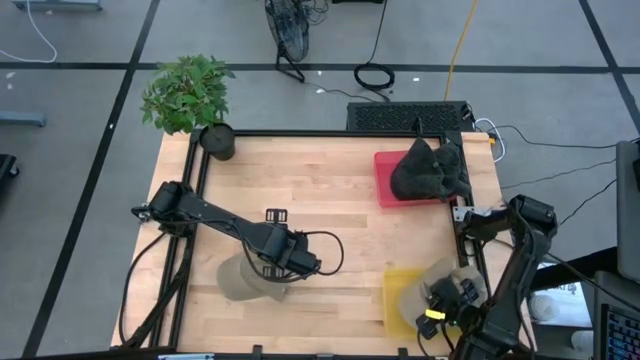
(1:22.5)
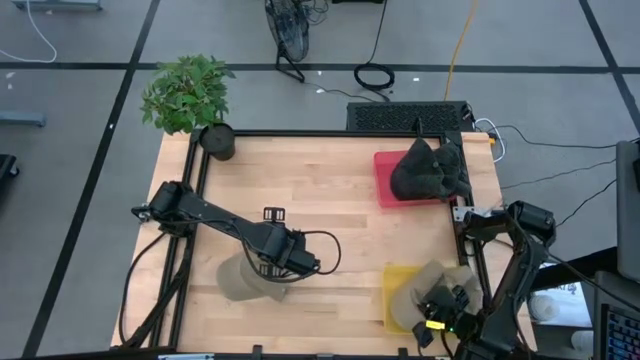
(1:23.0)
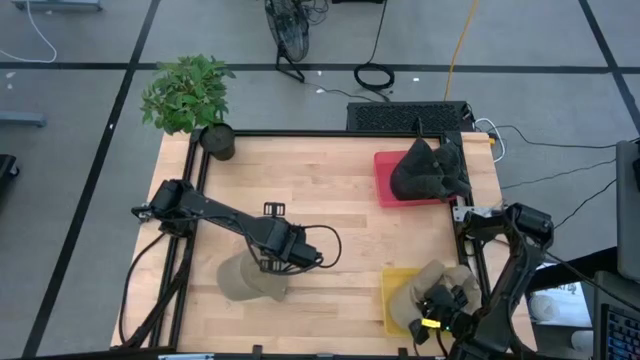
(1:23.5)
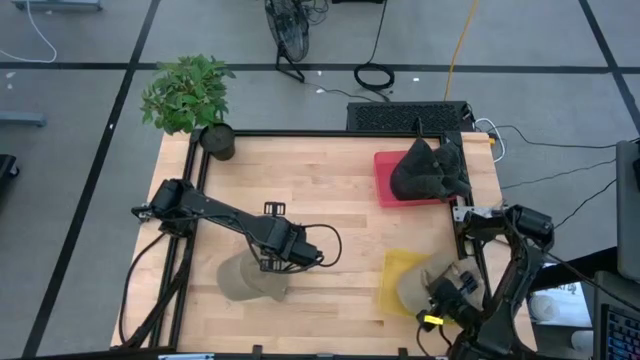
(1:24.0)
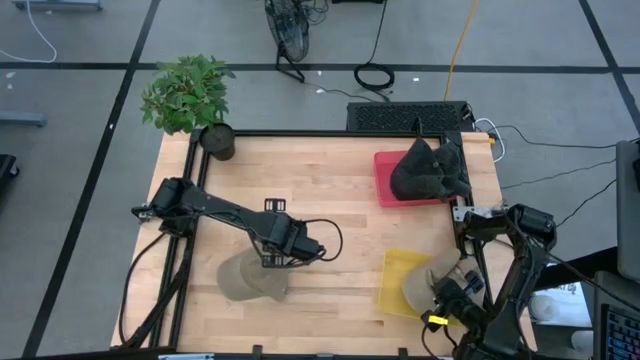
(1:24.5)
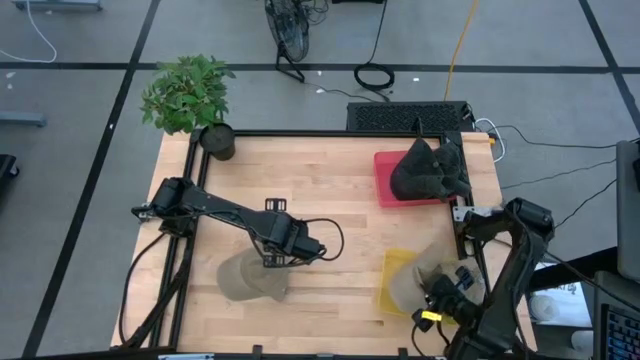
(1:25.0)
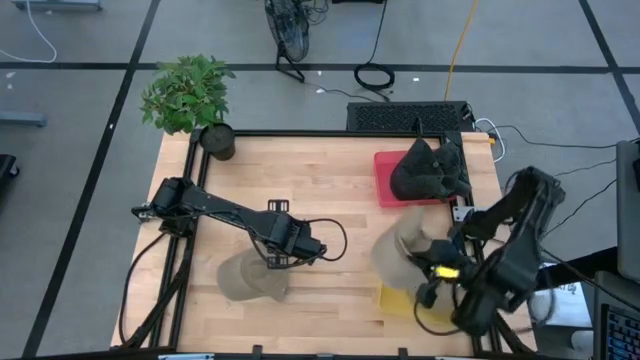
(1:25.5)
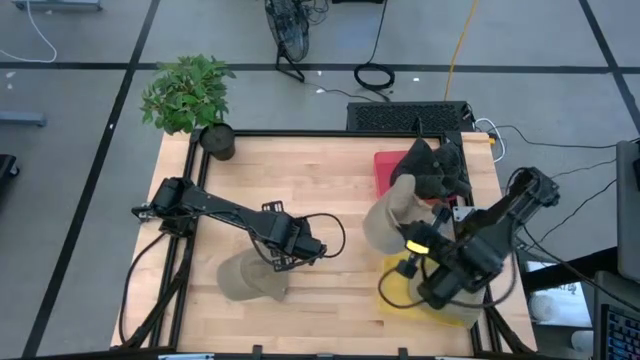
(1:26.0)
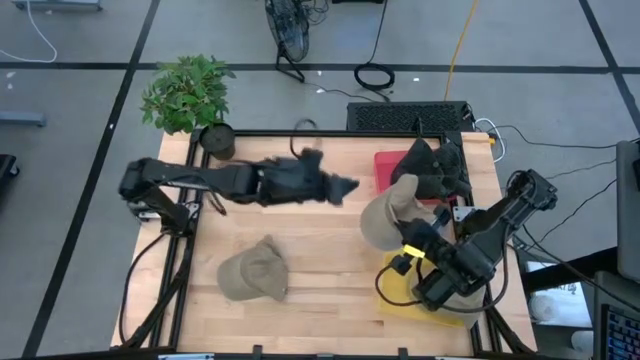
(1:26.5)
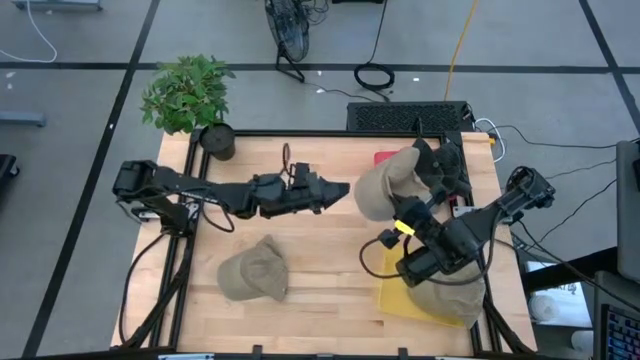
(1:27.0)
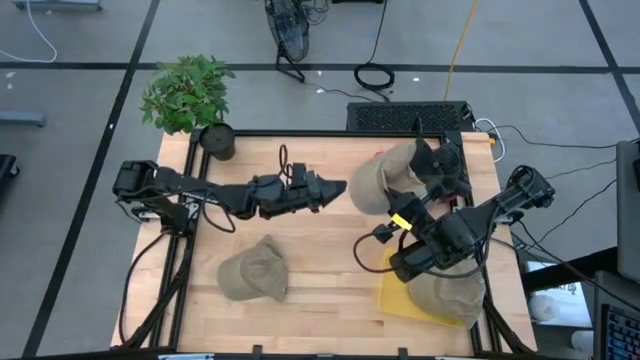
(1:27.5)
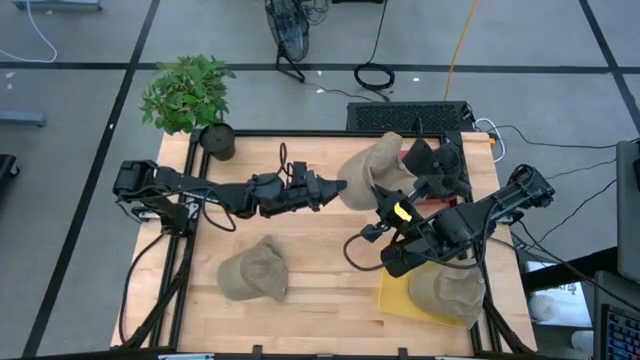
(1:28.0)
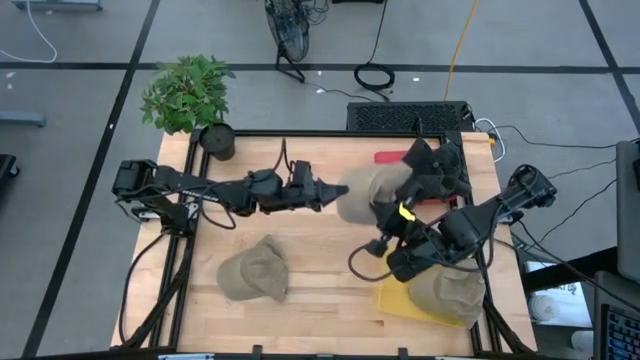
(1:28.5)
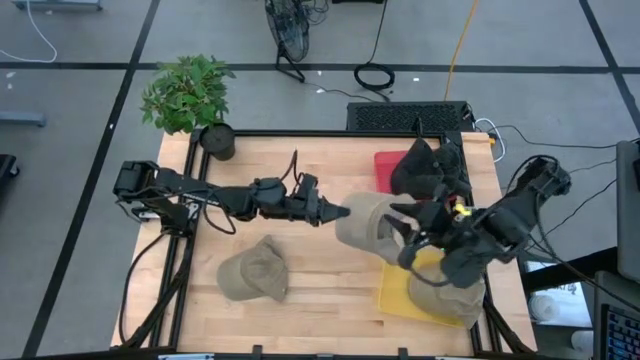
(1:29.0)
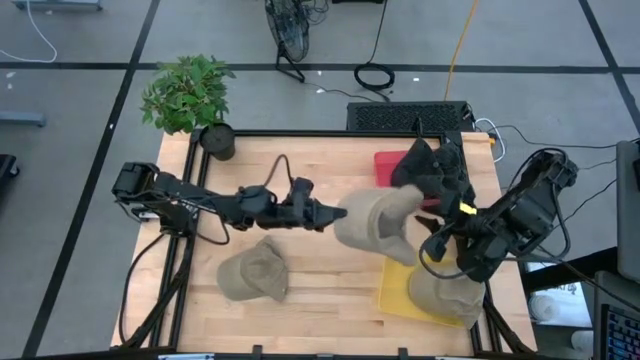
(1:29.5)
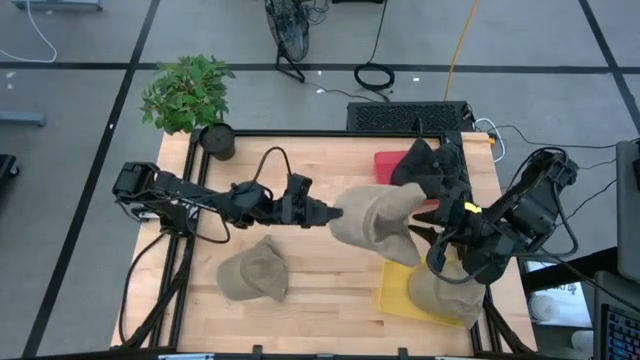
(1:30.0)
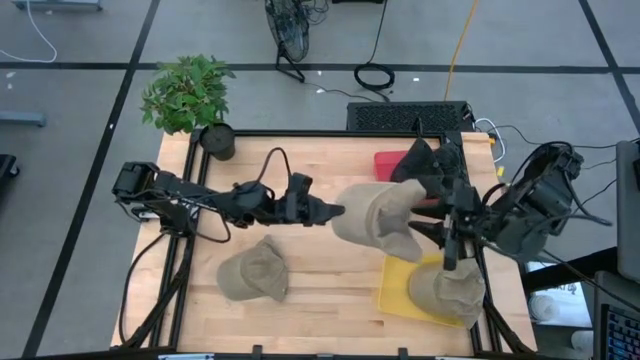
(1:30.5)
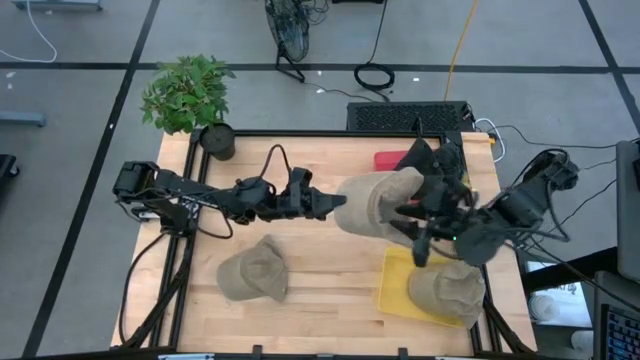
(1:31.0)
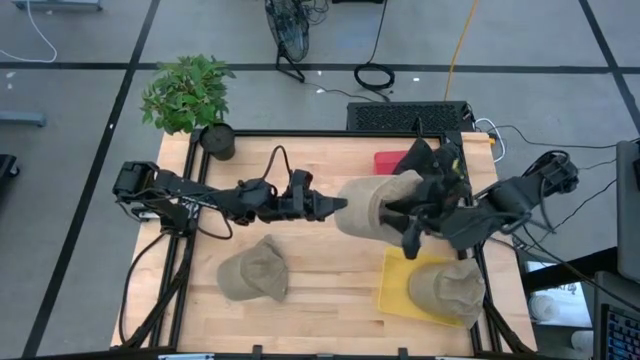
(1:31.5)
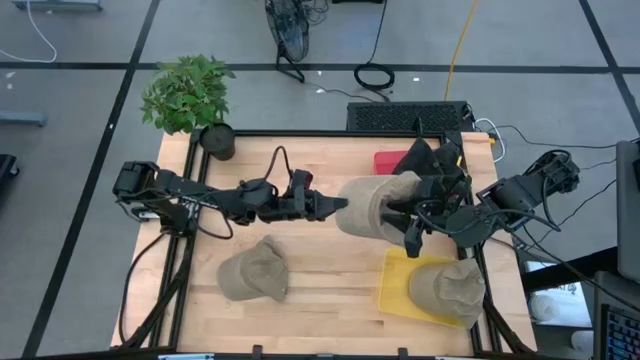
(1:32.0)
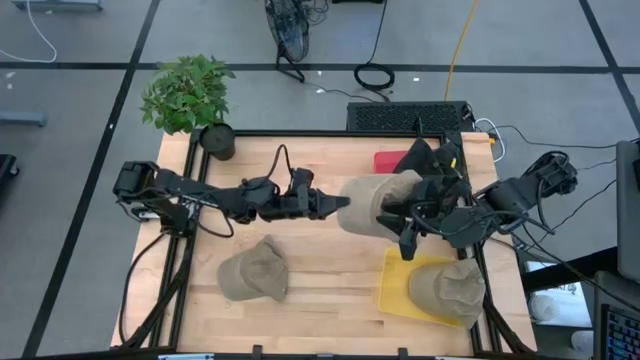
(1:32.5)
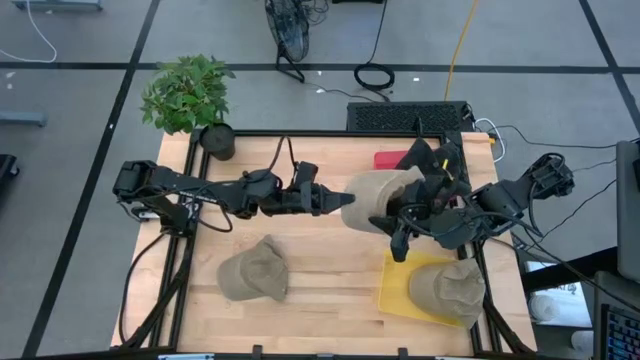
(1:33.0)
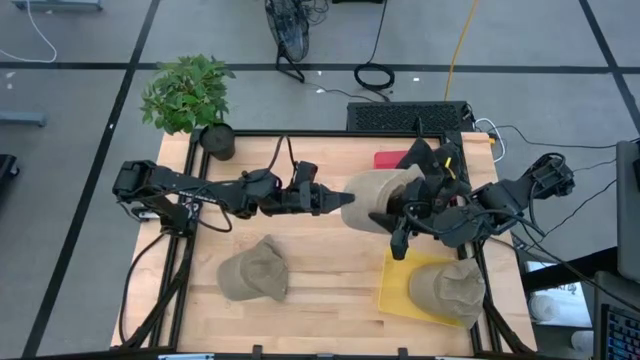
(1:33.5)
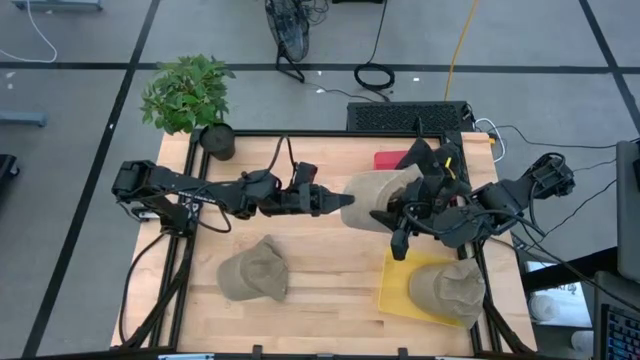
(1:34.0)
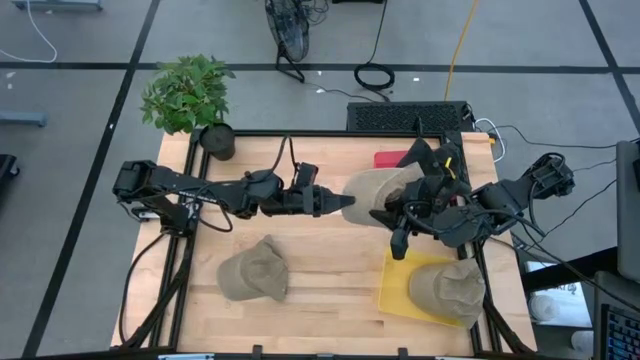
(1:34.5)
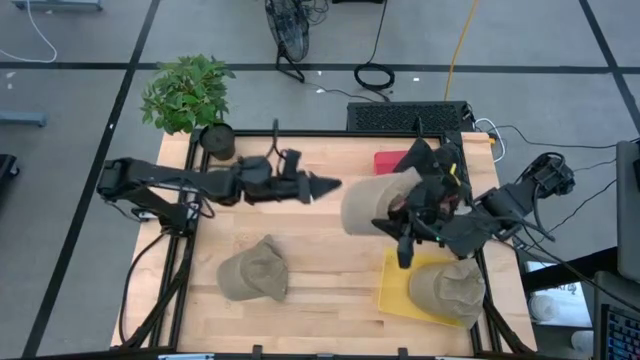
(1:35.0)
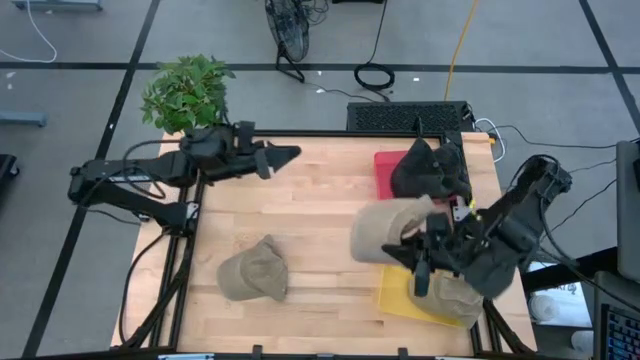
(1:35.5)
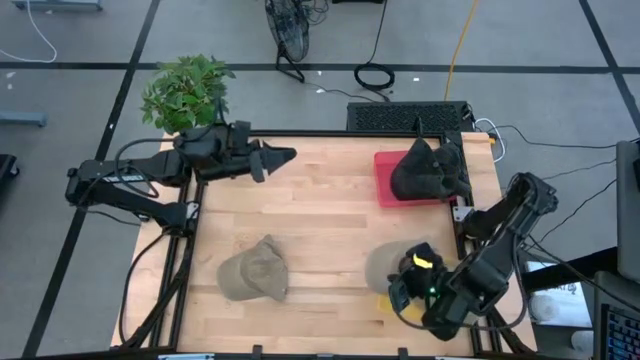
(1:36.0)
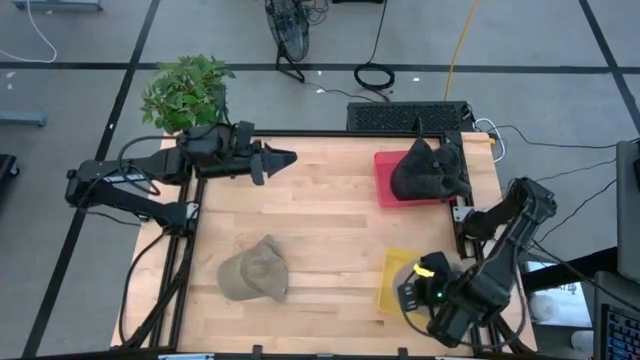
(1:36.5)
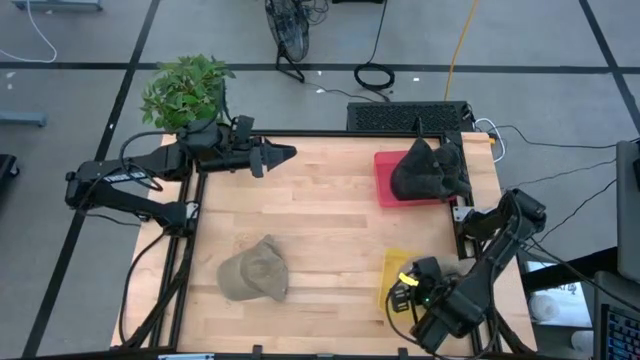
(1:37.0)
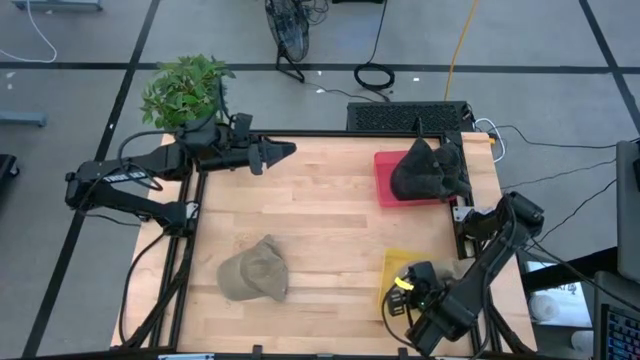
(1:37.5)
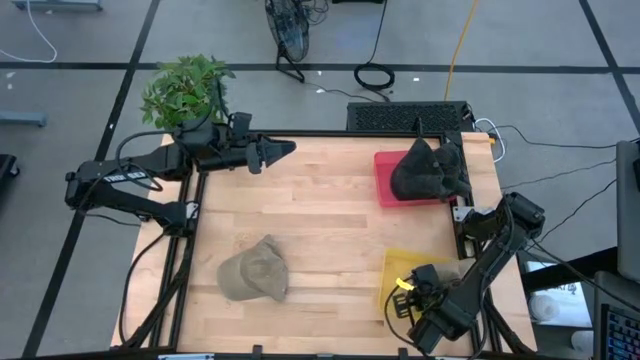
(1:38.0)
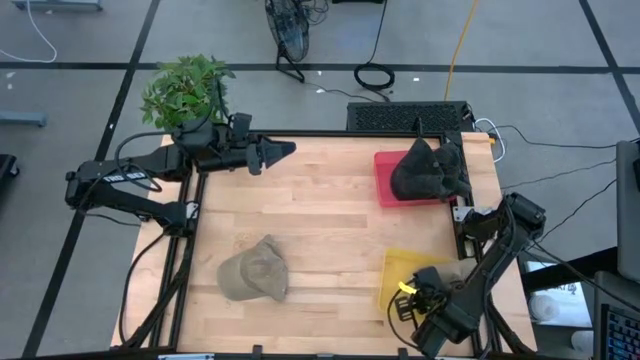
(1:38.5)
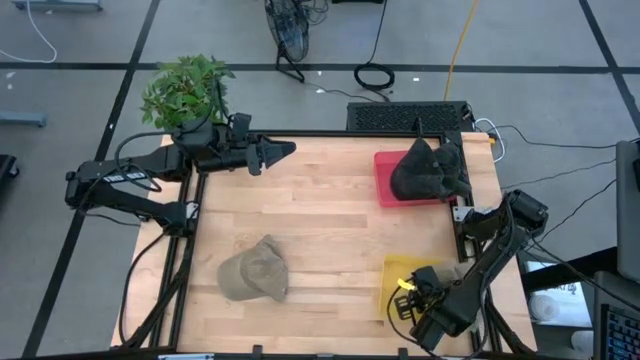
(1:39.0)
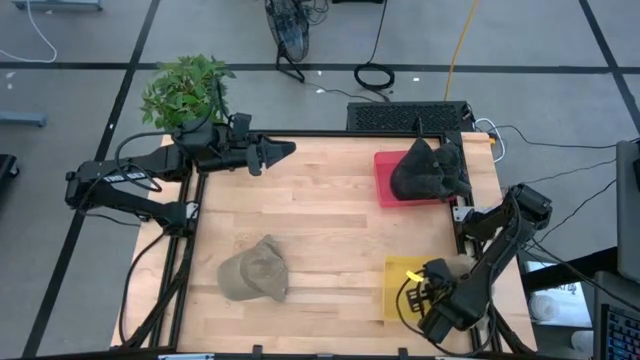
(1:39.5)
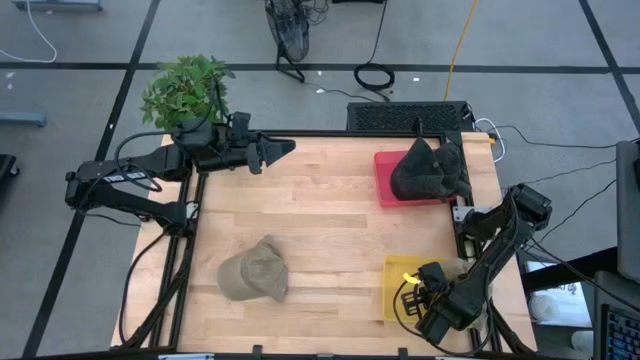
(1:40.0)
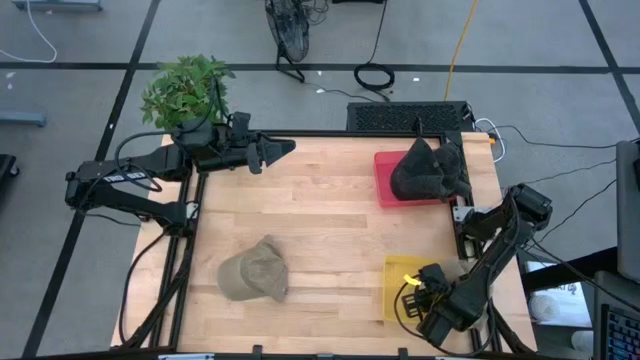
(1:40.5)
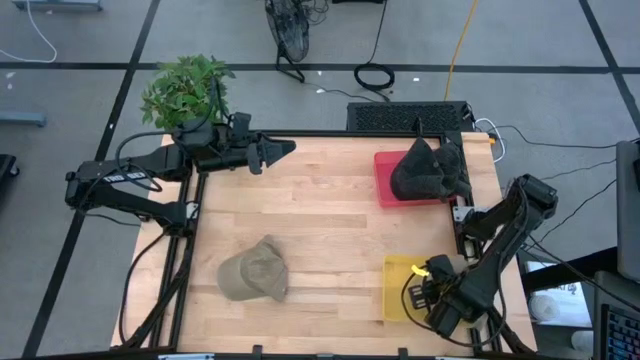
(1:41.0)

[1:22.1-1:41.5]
Task: Pick & Place hat
Put the bottom brown cap into the yellow bin

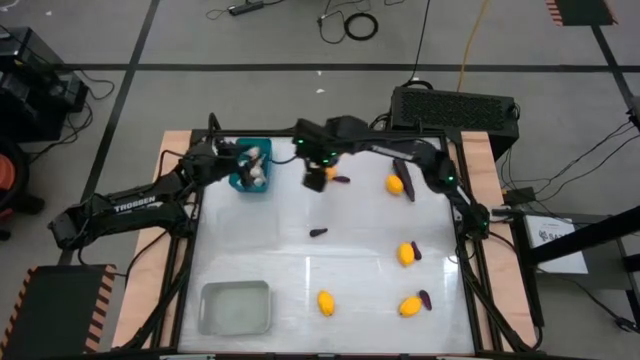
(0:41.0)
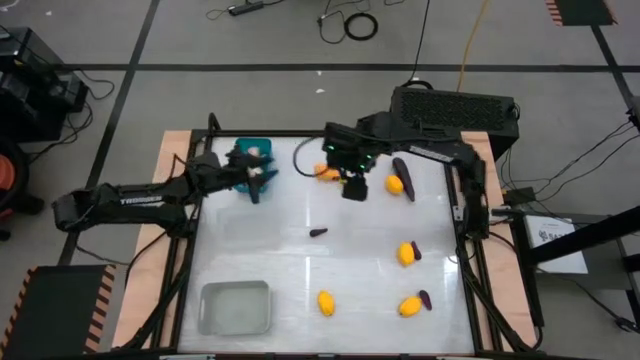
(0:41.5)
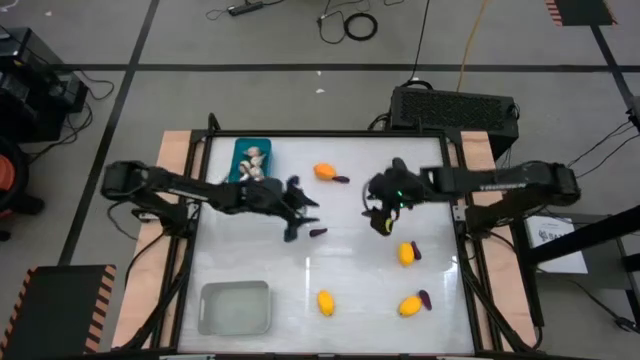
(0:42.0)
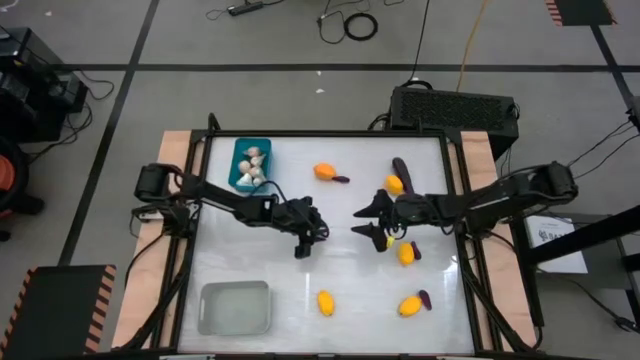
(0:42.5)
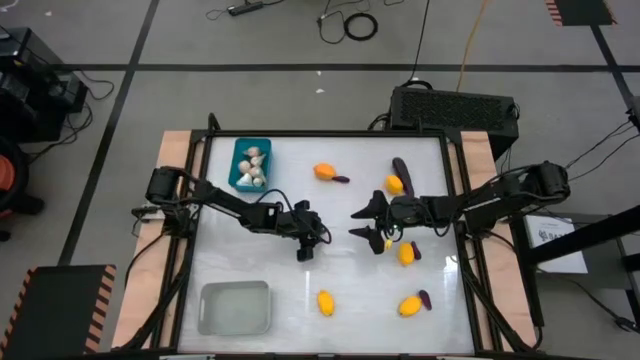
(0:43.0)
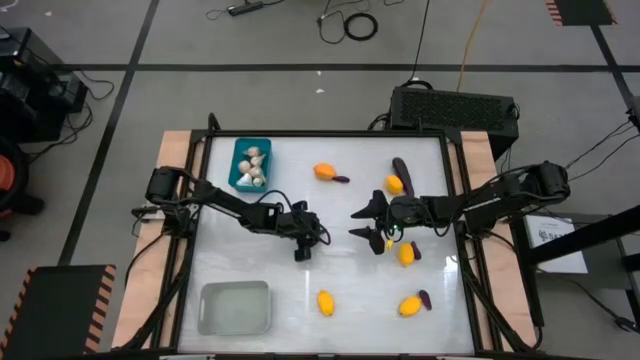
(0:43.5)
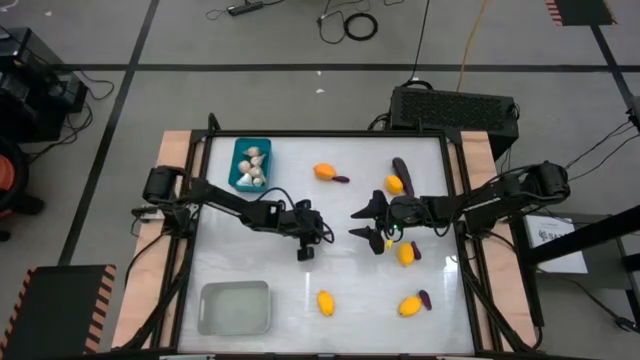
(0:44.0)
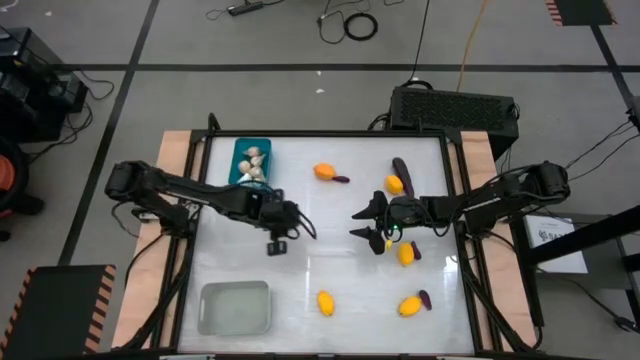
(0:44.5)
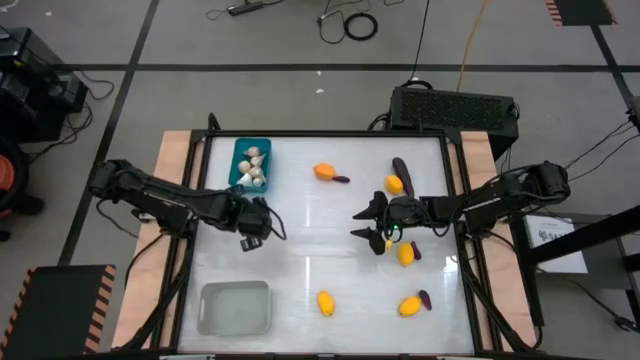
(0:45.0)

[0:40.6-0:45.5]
Task: Sort produce into baskets
Put the eggplant into the transparent bin
